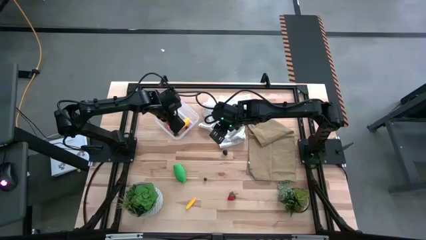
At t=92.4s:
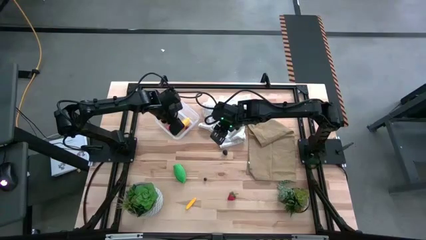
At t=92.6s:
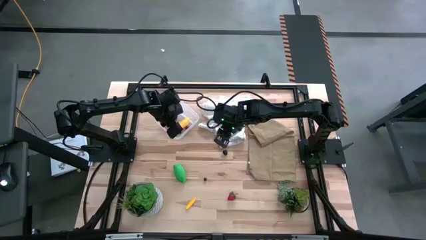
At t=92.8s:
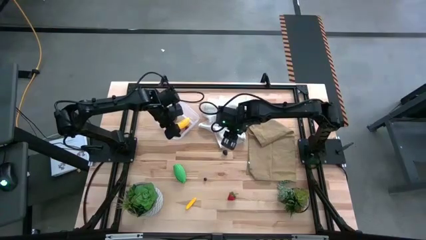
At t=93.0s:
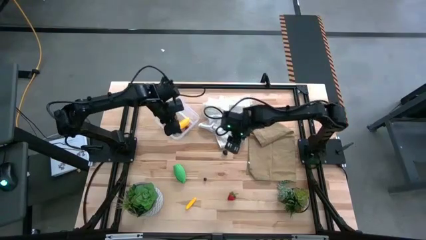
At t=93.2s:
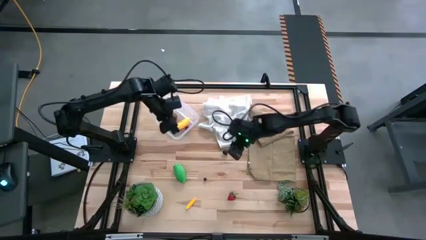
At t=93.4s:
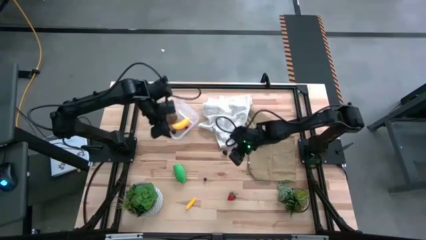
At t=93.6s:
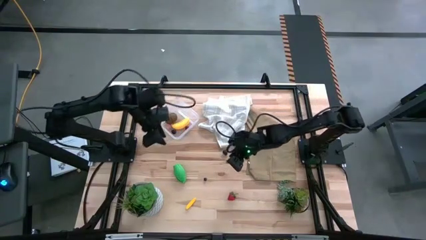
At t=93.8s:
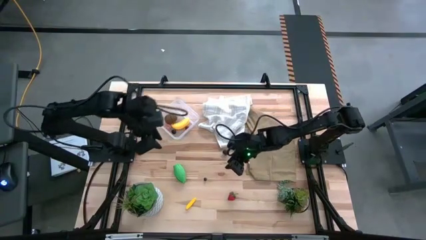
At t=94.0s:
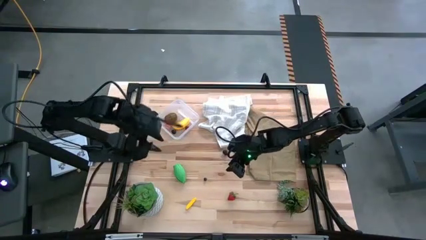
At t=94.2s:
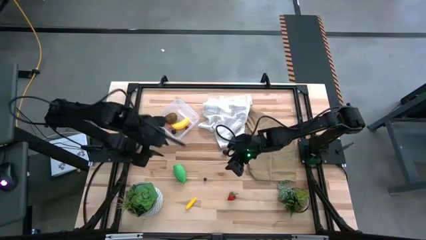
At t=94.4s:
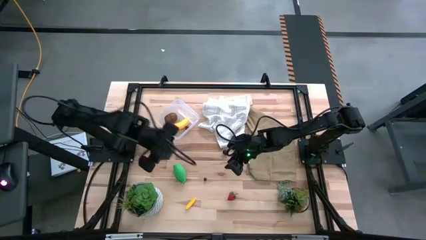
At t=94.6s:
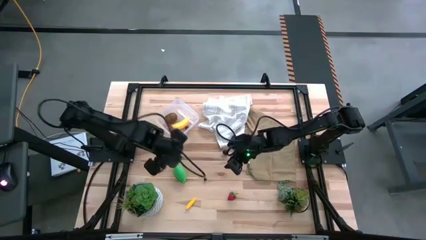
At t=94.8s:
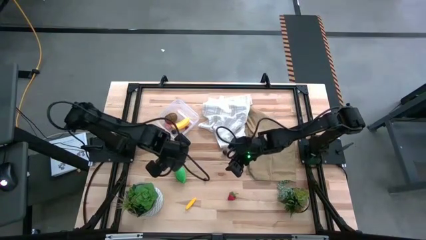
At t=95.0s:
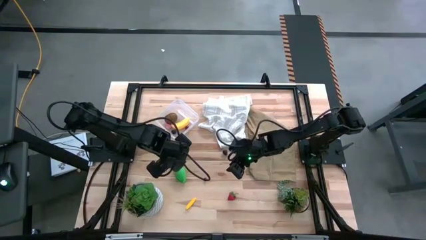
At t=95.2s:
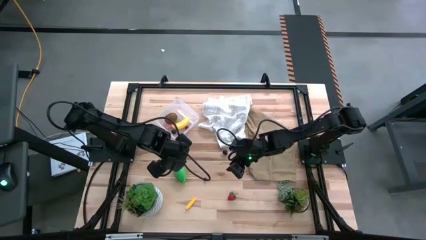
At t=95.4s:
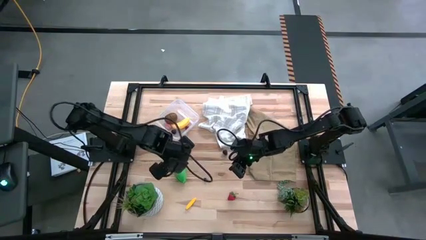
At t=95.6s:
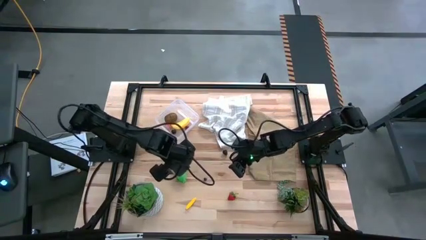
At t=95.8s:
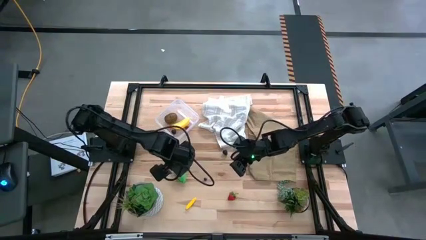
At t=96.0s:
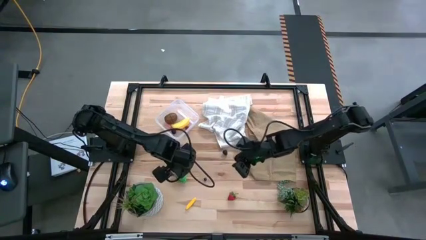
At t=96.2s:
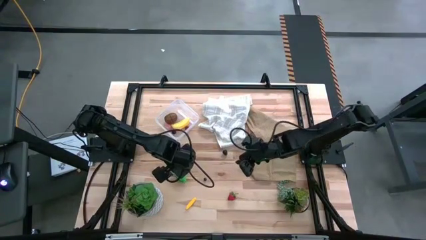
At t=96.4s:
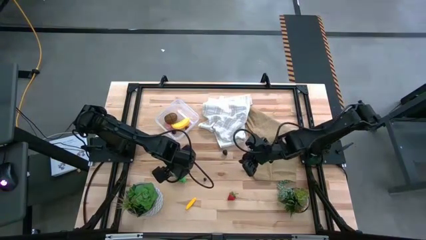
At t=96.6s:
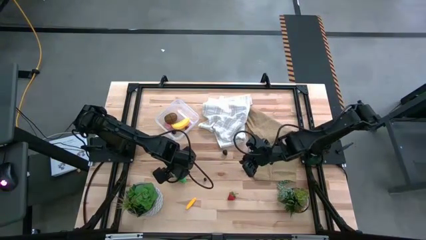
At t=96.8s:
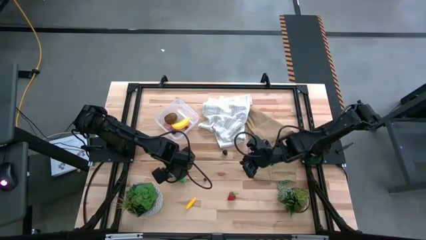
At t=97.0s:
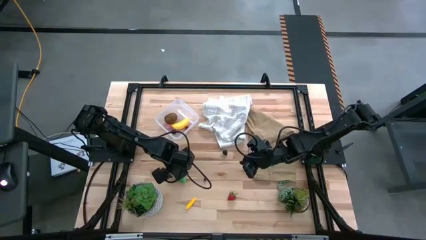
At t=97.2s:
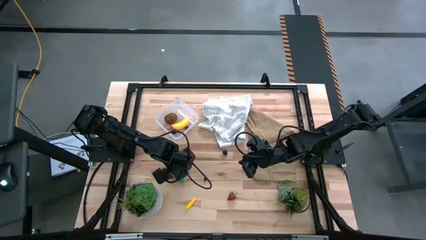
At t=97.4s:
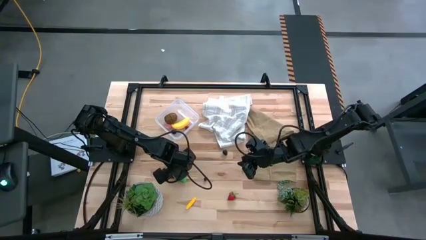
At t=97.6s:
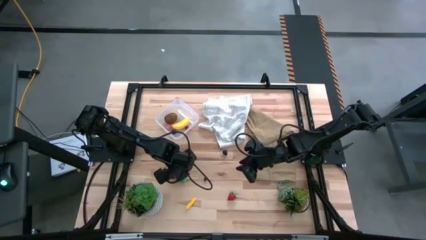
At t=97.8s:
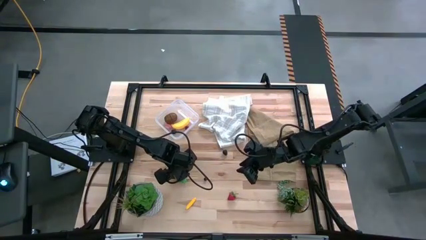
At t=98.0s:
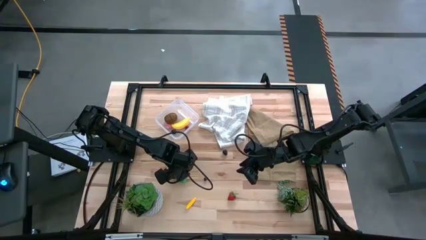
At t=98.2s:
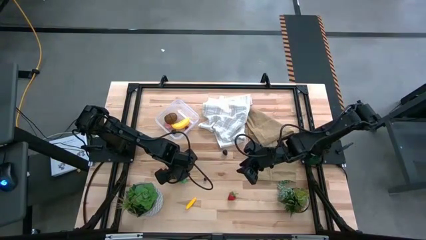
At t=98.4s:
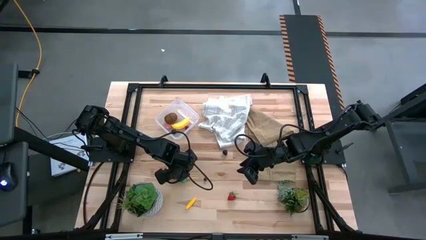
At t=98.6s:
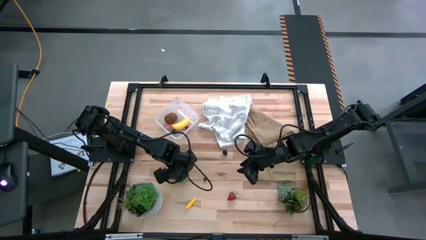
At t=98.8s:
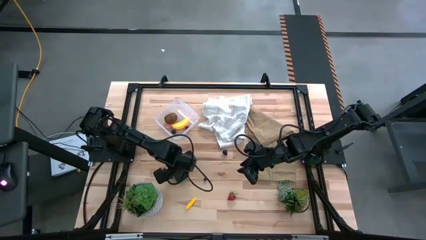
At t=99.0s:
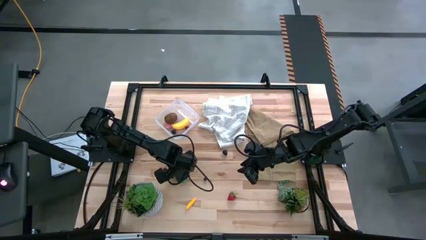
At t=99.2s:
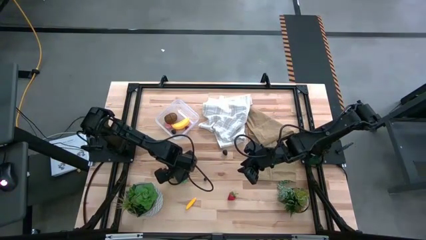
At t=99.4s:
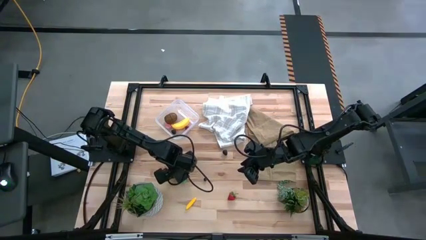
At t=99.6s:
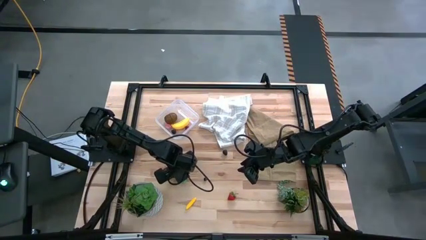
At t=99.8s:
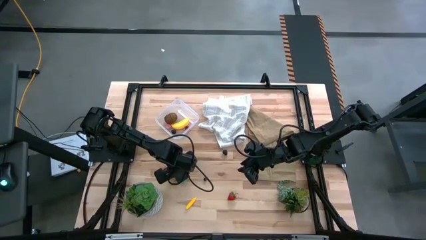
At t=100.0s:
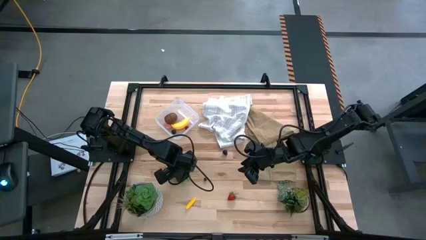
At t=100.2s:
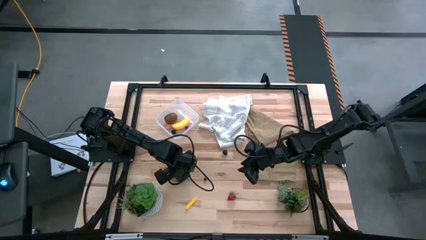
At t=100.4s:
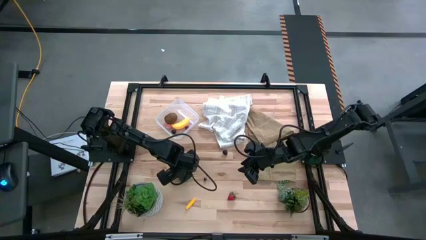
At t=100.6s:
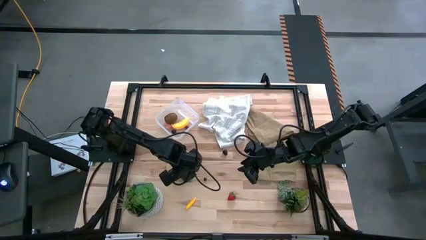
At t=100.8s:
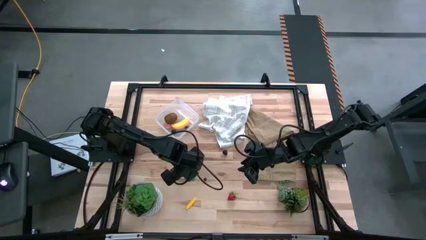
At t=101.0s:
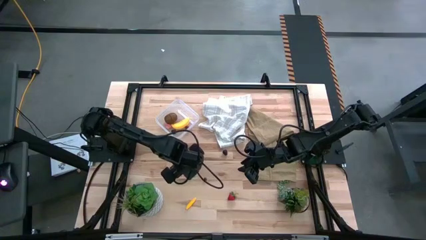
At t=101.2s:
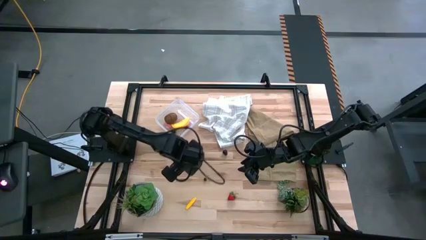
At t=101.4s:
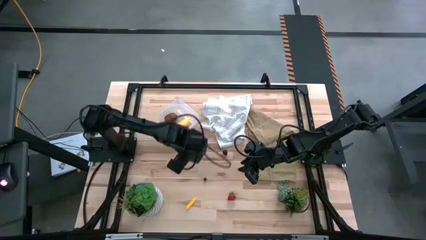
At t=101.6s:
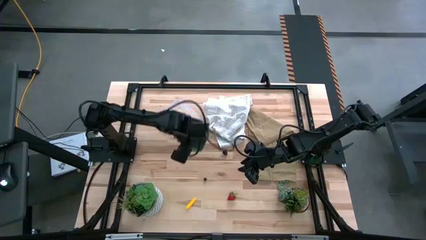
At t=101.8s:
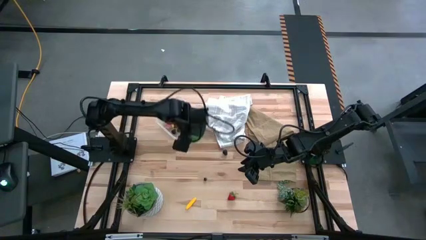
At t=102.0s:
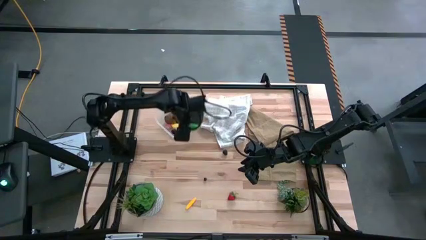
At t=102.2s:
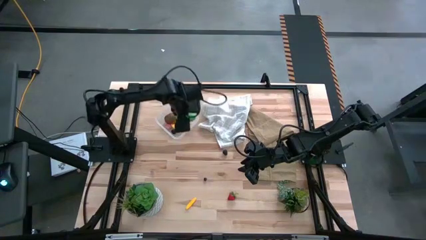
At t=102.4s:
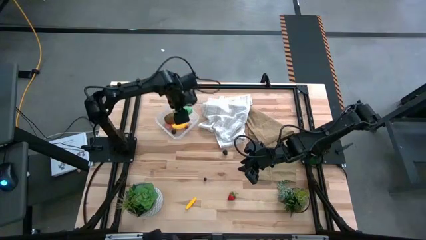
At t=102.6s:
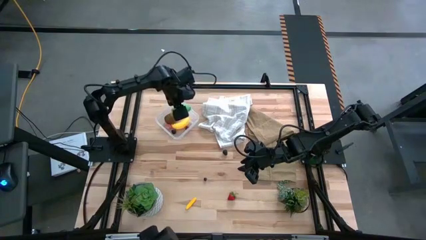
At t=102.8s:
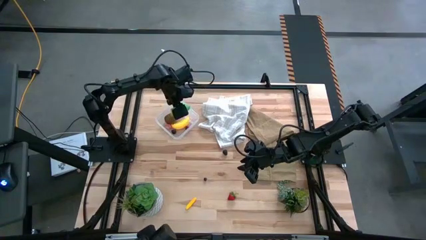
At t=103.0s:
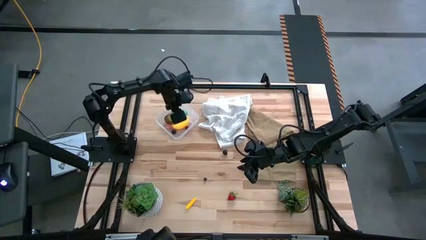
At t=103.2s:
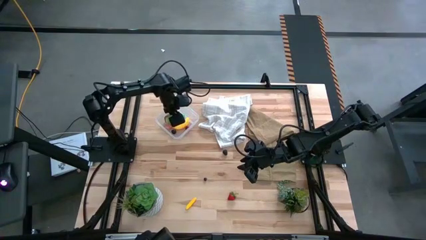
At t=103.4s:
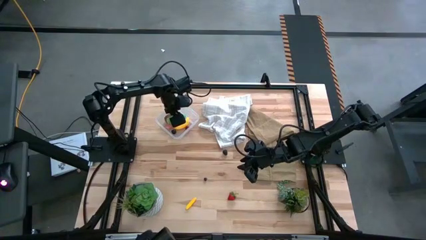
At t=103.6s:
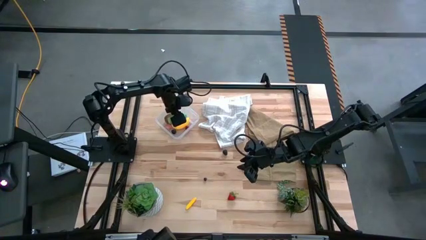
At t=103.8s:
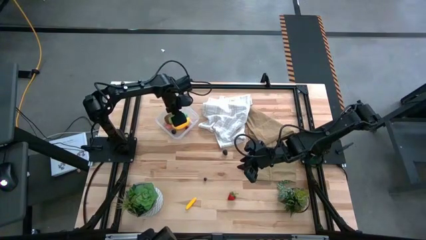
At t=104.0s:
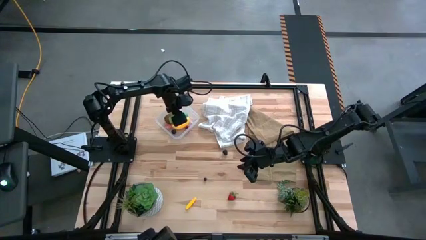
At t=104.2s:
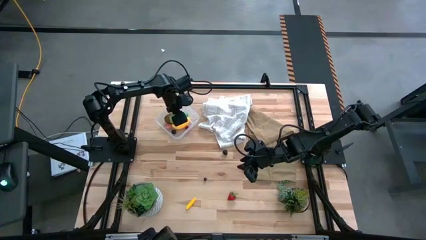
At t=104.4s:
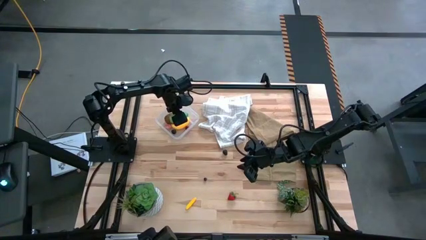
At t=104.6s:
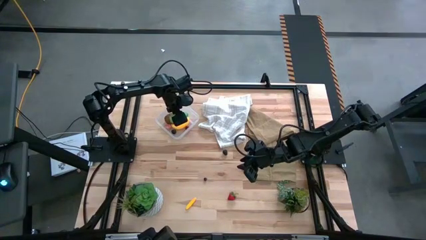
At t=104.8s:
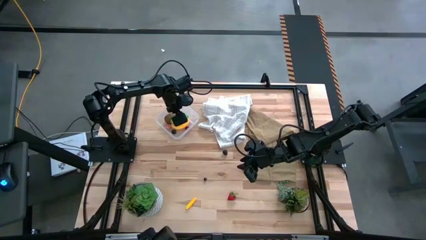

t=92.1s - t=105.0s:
Task: Pick and placing Produce into tupperware
Put the green corn into the transparent bin

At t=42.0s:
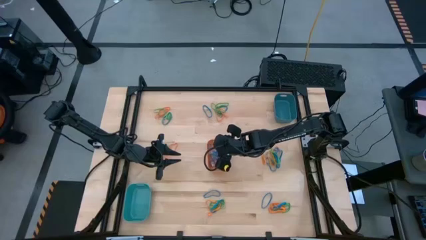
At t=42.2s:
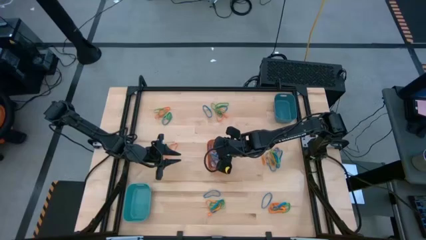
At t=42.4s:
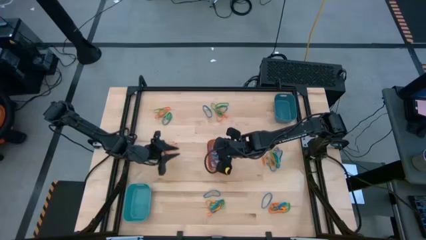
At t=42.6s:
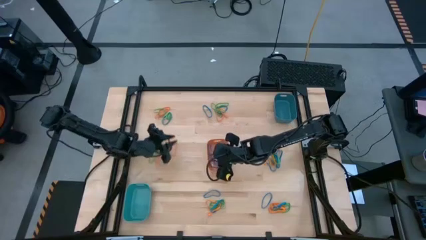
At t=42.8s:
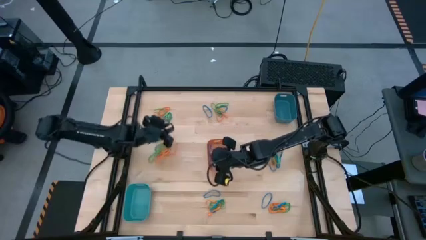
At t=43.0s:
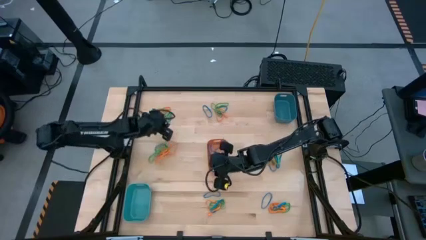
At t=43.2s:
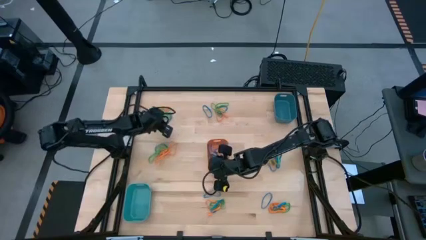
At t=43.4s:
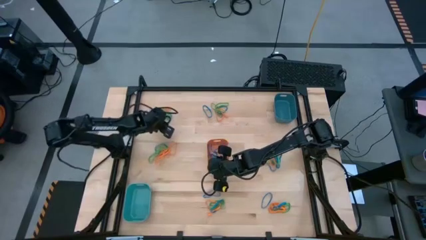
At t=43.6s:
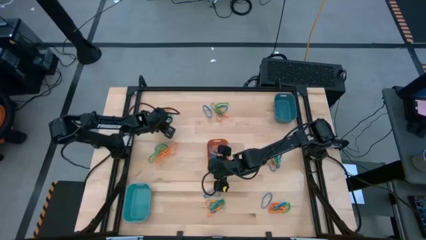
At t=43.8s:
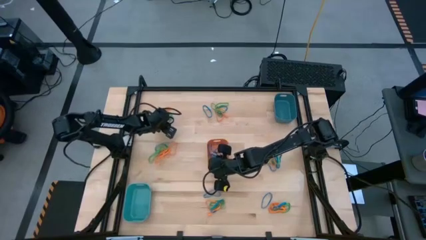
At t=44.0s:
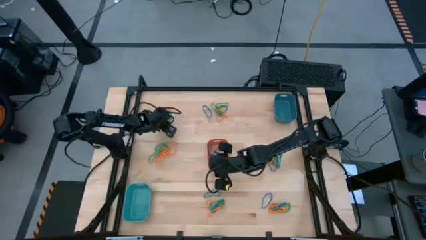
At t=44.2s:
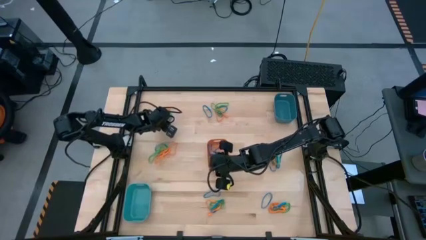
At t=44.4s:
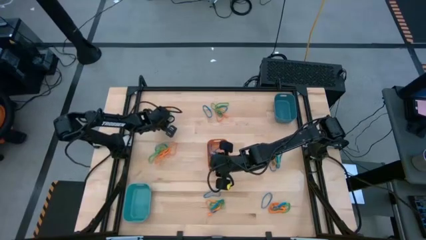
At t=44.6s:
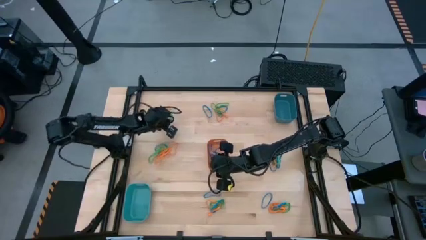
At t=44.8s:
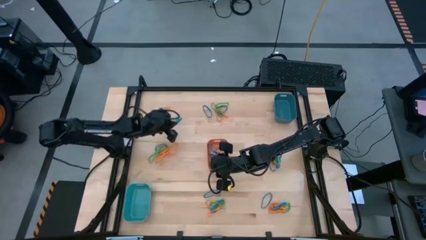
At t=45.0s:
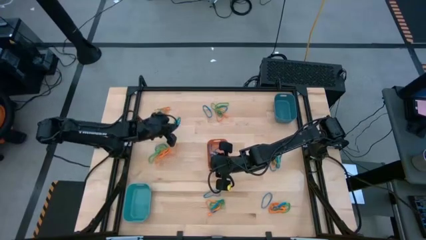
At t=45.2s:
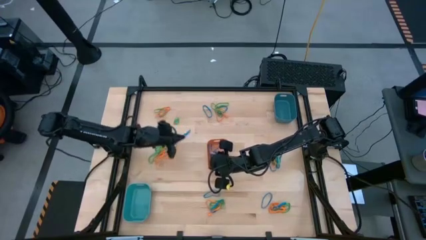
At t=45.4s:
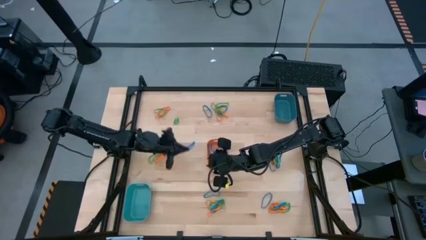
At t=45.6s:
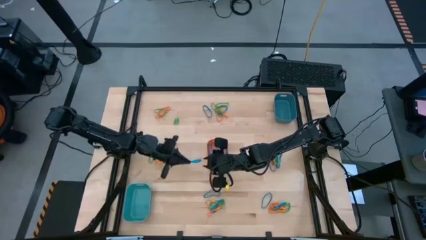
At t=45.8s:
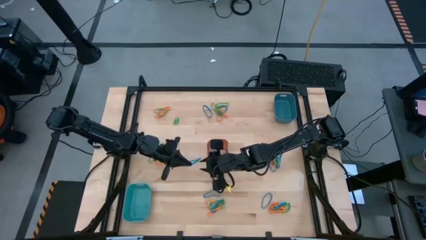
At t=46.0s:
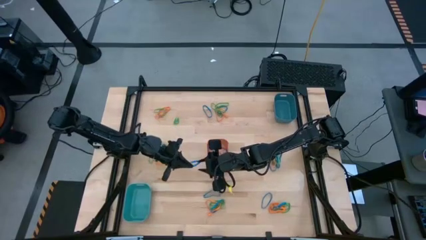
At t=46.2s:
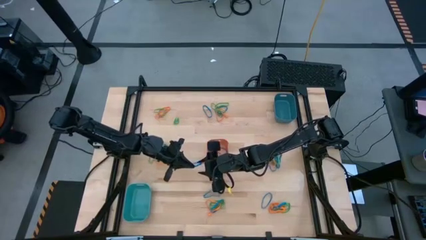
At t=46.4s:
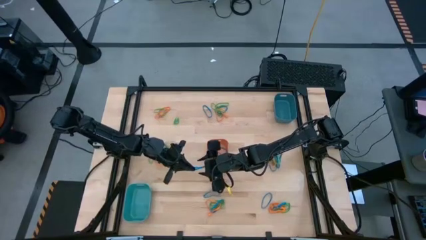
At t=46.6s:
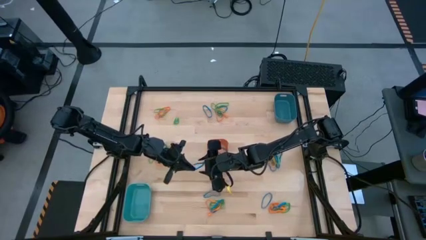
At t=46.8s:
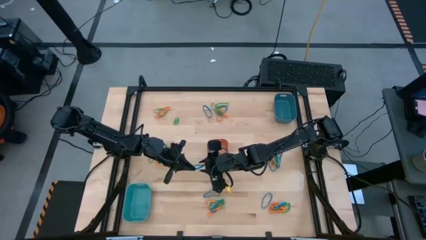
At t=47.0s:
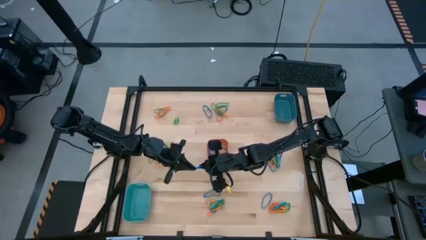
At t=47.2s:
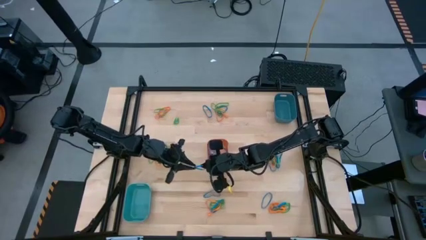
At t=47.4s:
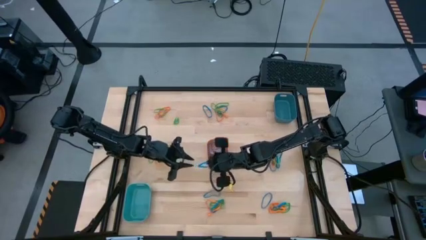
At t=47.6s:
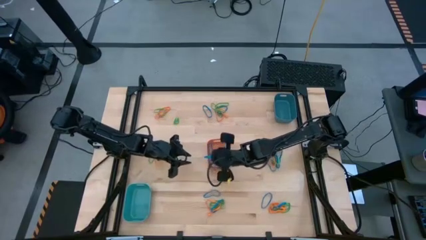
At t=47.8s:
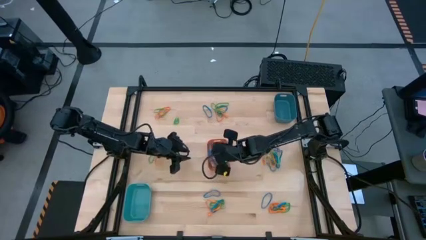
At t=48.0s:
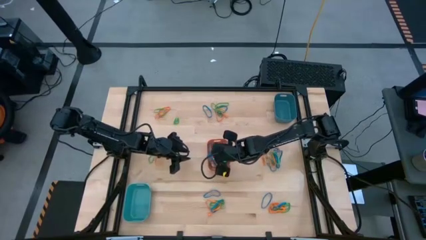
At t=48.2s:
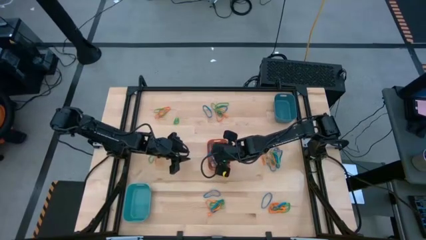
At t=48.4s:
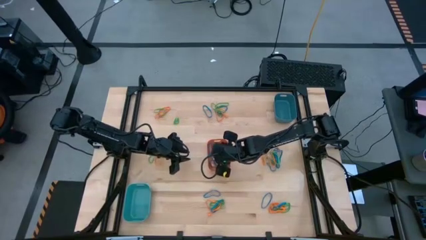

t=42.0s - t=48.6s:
Task: Sort rubber bands into baskets
Put the blue rubber band into the orange bin
